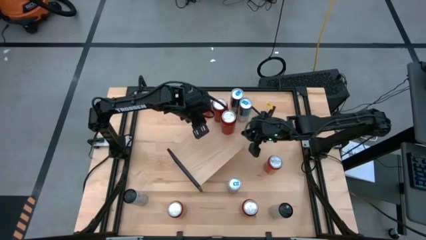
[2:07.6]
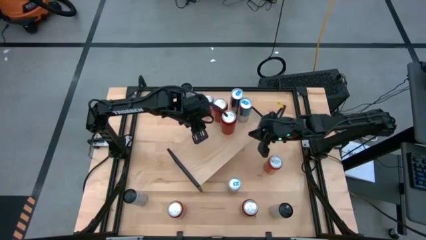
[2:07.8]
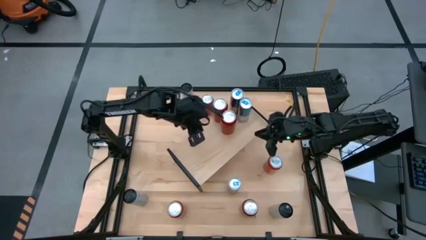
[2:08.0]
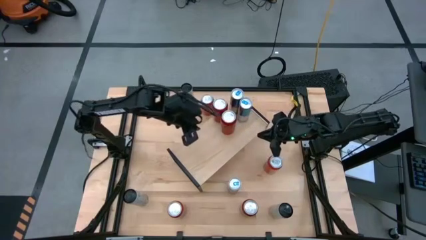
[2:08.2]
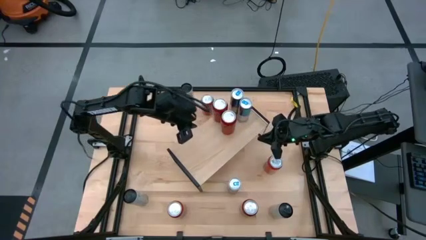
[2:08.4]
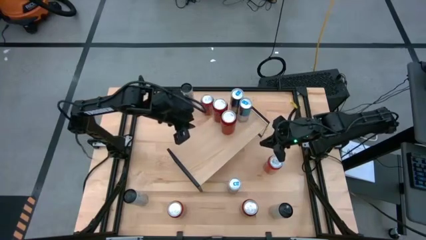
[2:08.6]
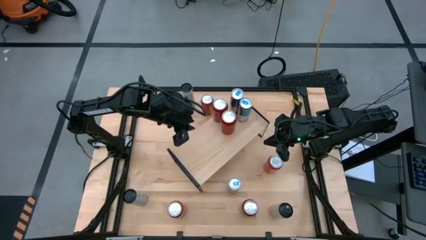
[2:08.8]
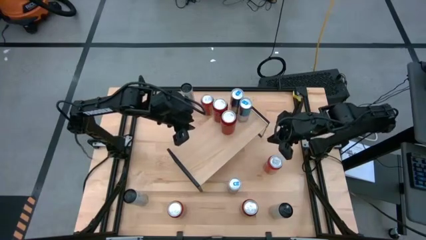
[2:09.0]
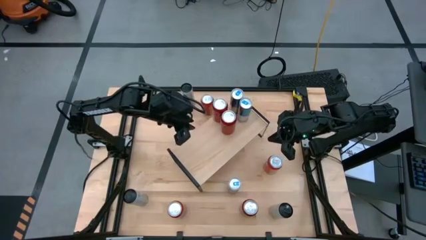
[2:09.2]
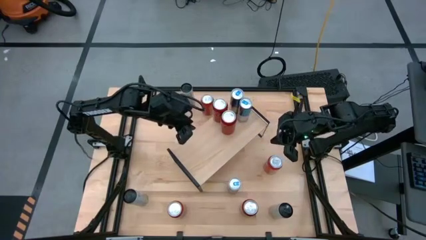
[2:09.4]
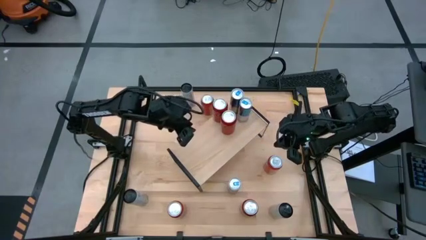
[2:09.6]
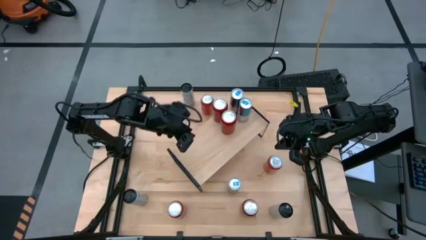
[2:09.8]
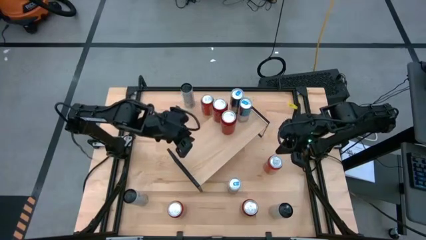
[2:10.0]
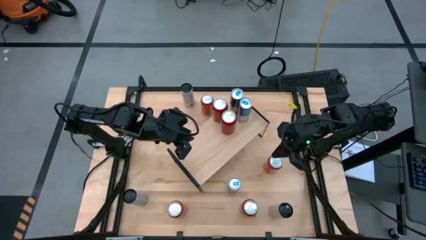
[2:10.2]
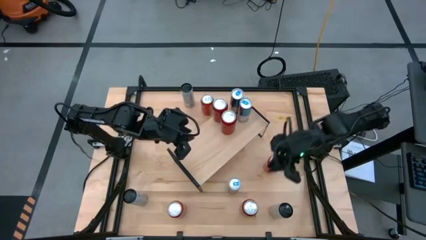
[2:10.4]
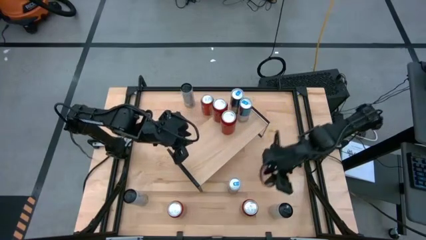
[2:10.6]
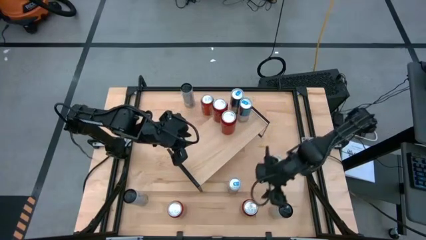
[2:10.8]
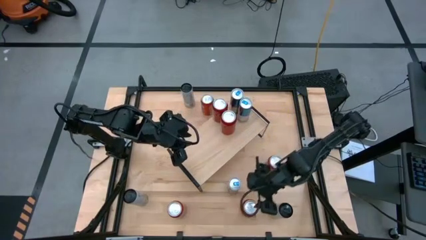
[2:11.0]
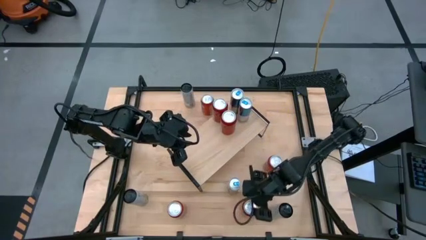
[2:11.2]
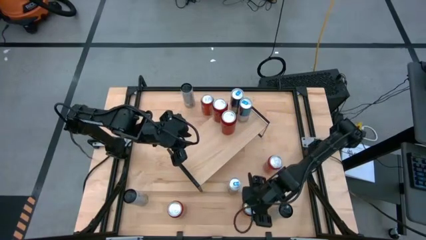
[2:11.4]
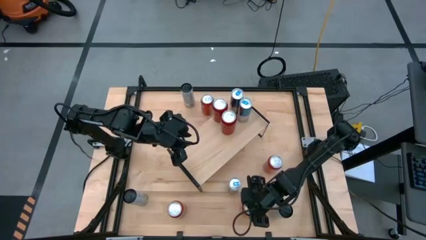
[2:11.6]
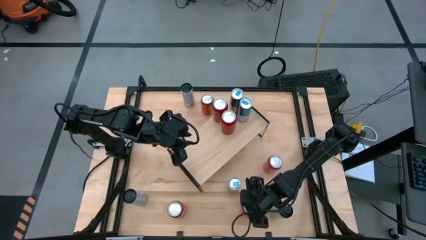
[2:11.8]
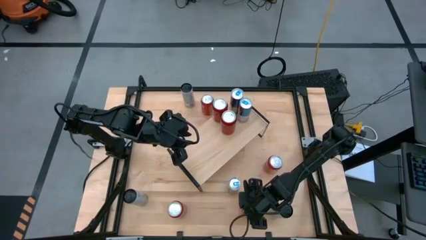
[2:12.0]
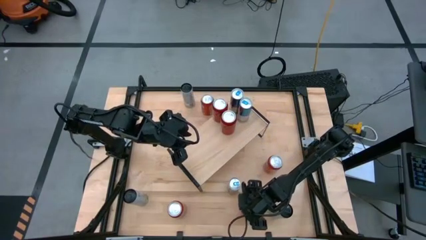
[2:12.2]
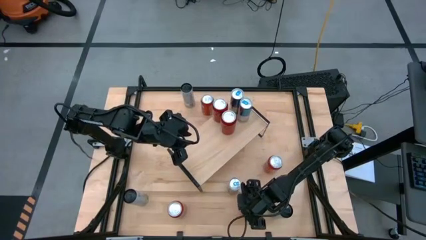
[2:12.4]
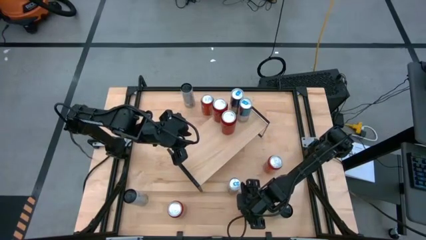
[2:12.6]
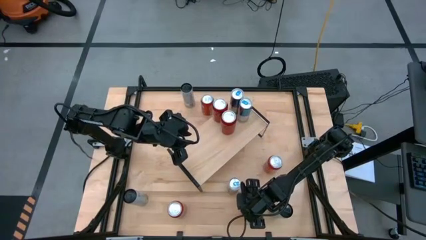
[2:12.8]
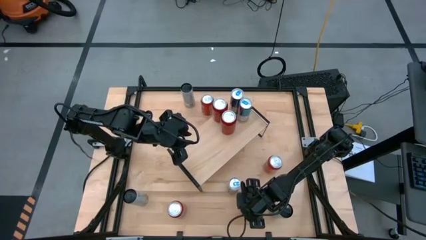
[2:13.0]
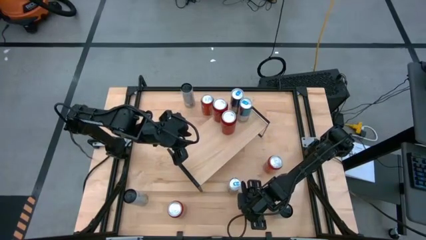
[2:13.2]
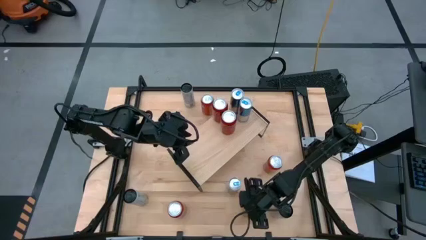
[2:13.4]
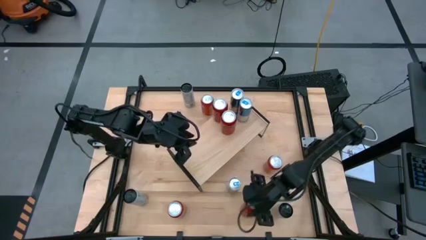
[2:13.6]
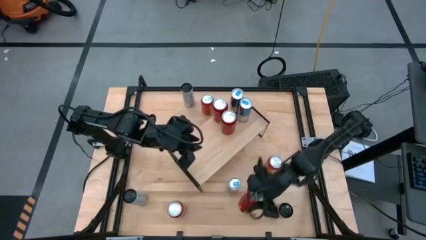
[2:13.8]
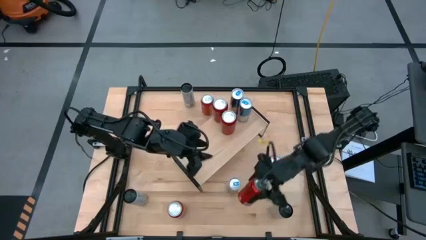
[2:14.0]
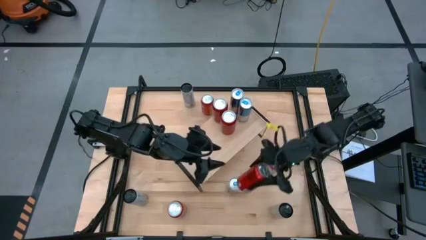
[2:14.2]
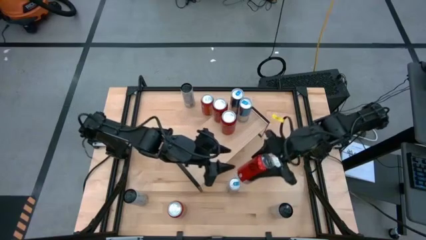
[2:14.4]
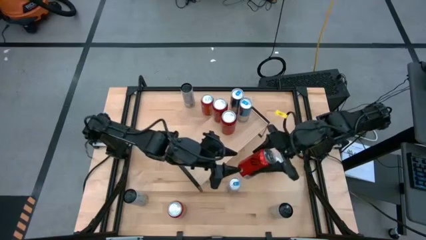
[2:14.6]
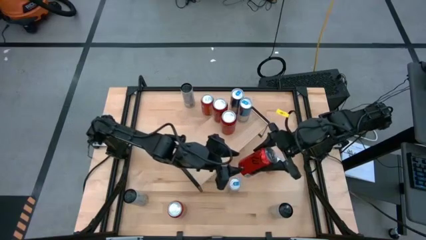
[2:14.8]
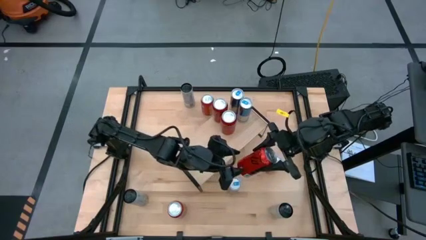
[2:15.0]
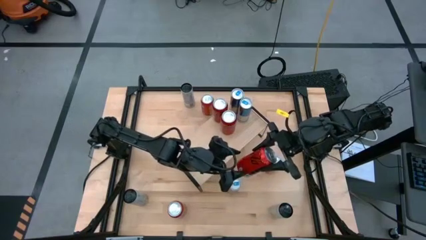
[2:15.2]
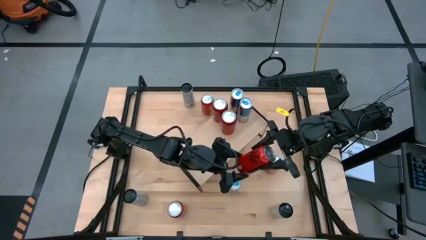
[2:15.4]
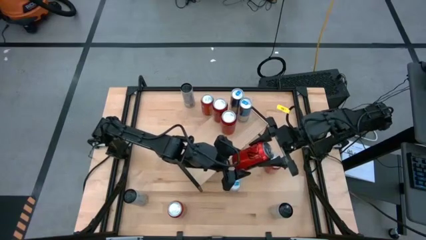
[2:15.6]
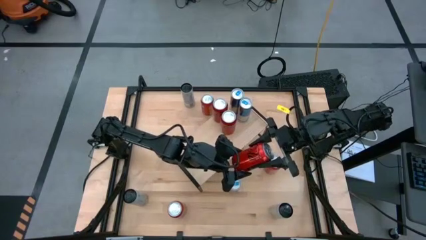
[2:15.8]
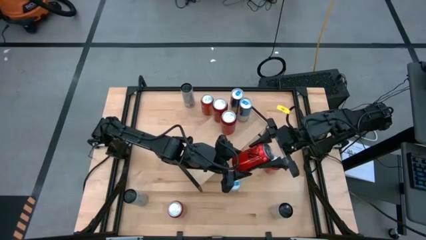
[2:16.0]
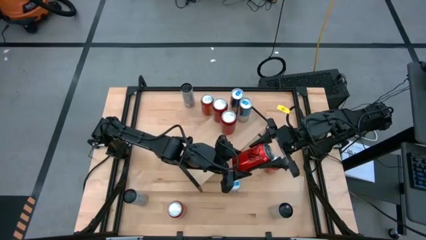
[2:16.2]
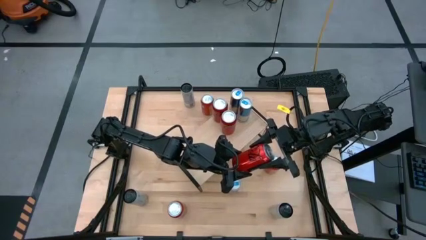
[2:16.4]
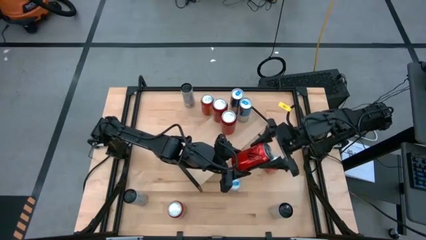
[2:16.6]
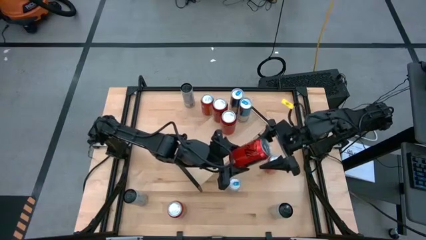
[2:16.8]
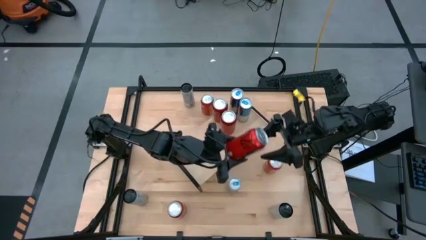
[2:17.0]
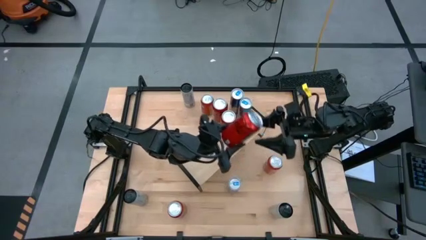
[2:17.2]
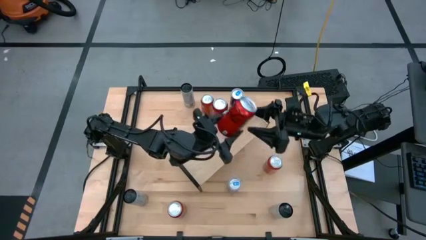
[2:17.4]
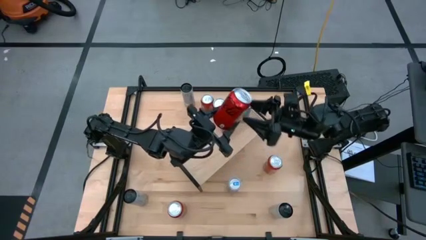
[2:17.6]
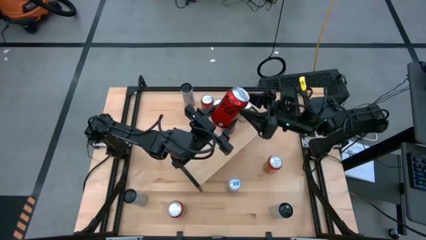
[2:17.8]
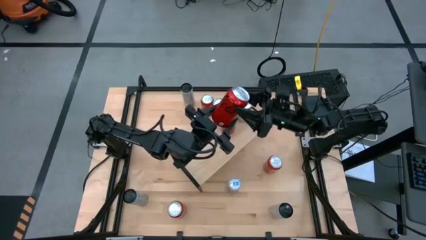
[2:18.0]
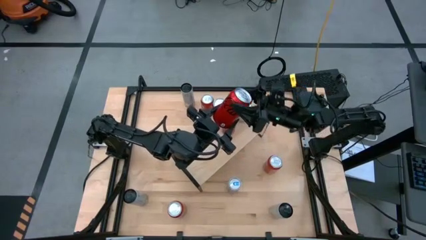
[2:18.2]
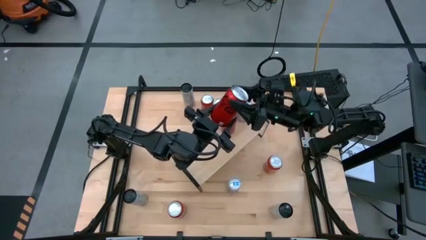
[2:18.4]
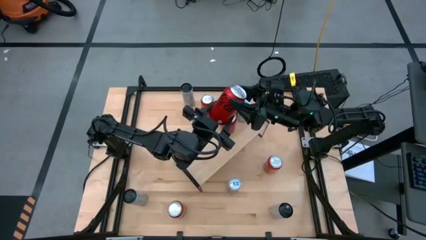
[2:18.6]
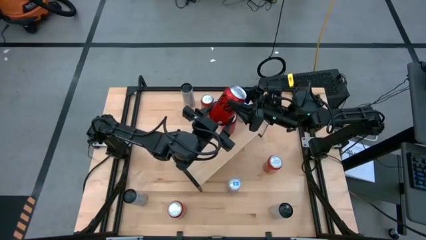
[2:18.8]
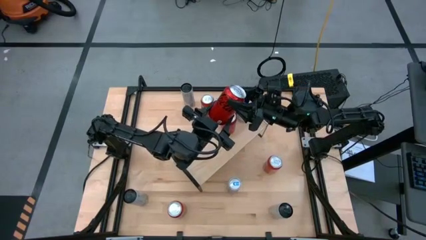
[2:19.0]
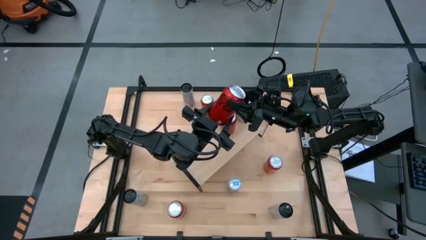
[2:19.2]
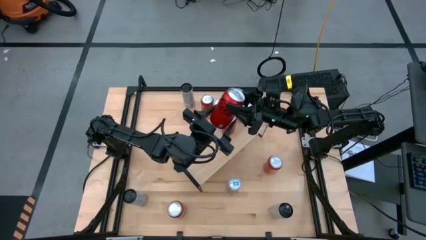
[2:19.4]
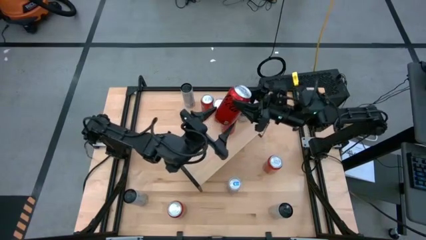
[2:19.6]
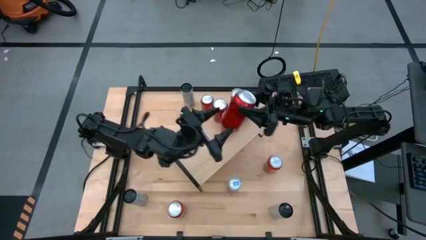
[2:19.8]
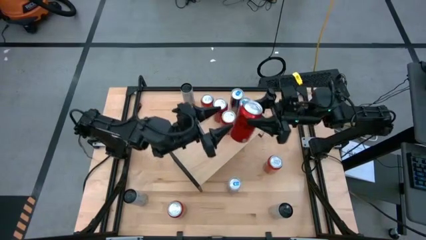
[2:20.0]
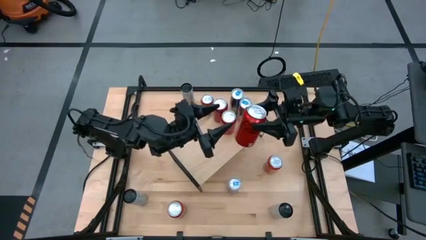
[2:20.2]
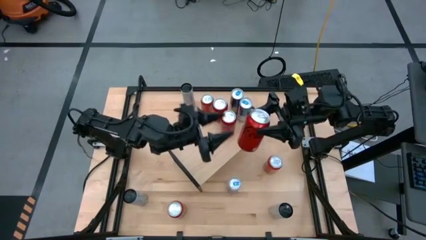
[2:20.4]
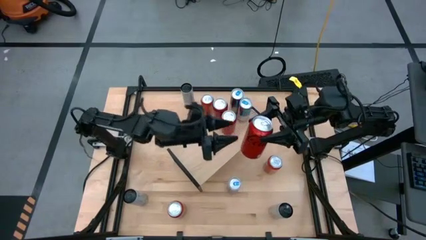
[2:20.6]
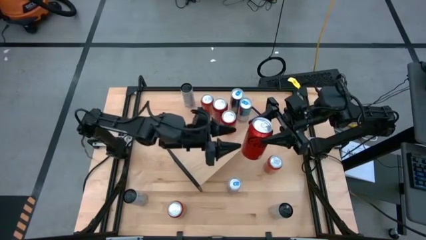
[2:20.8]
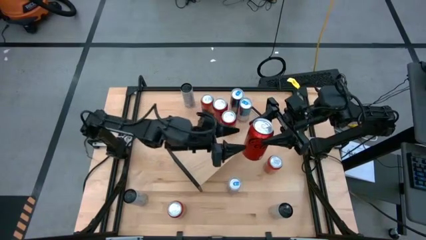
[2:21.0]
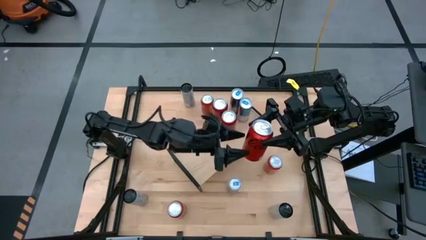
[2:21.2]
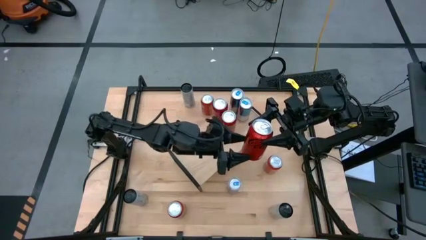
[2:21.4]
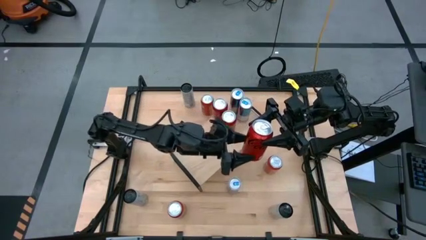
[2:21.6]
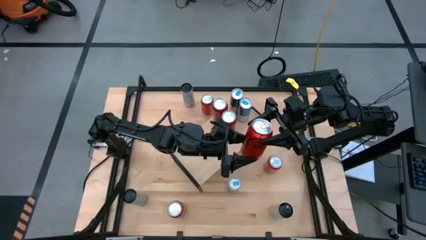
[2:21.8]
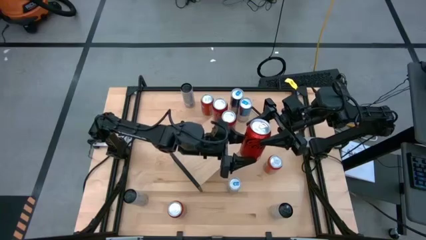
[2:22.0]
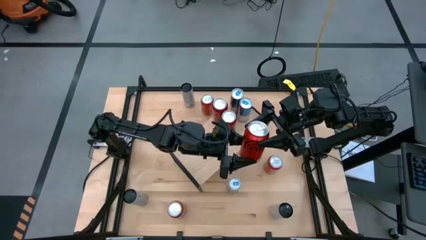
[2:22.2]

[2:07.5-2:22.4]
Task: Place canned beverage on shelf
Put the red soda can on the shelf

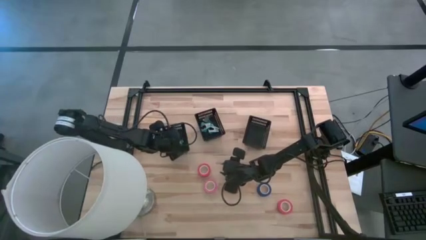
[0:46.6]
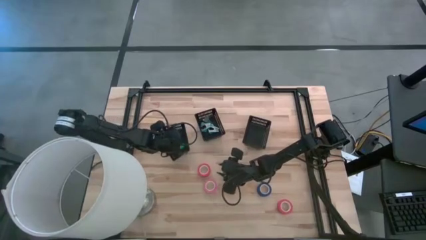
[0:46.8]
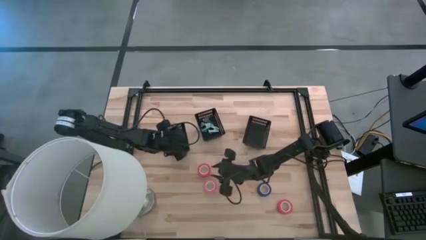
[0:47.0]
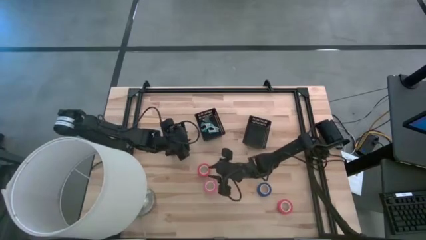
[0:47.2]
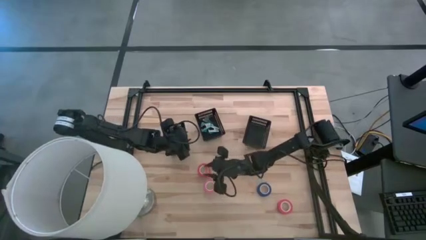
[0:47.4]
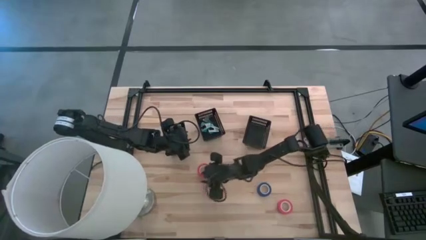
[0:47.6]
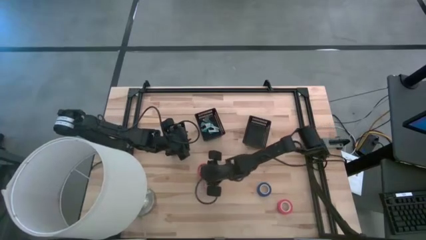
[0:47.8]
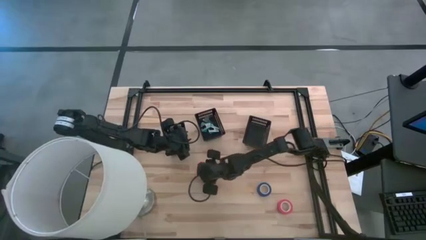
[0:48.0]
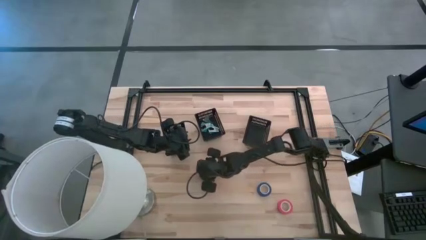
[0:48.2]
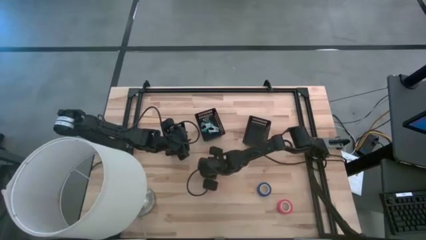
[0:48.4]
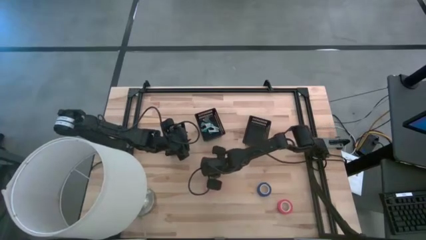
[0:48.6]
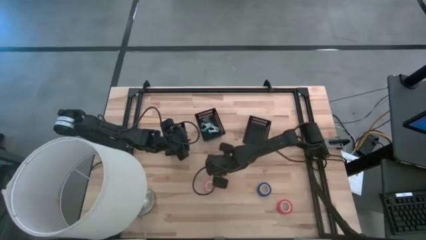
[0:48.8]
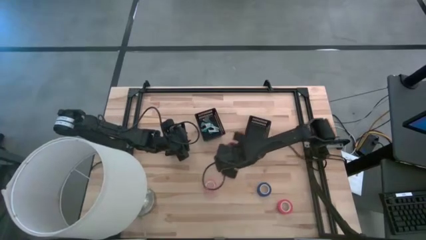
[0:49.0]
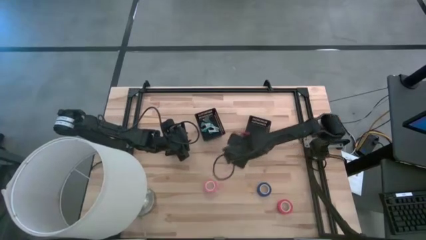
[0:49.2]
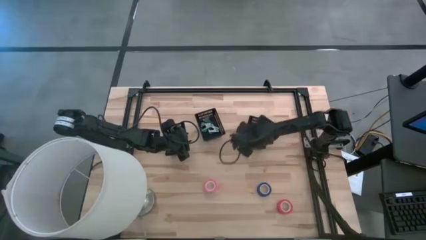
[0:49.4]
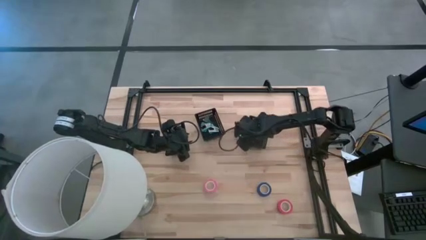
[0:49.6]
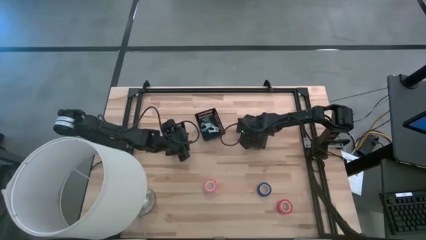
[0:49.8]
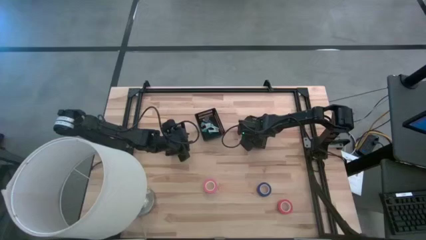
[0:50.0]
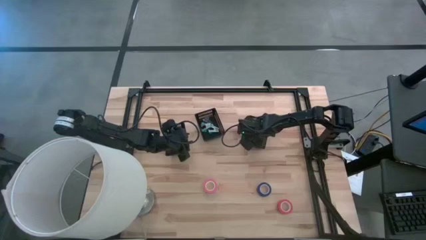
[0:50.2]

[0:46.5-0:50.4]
Task: Pick and place Stapler, Stapler remover, tape
Put the left red tape into the right black bin
